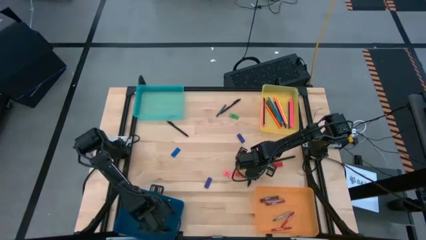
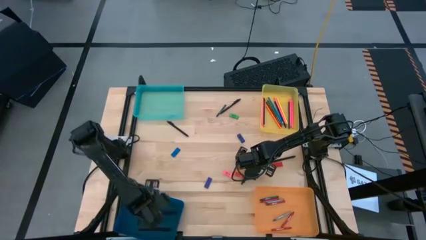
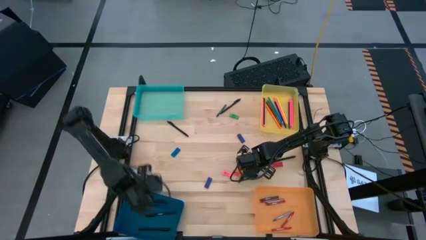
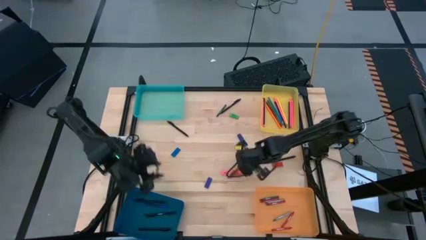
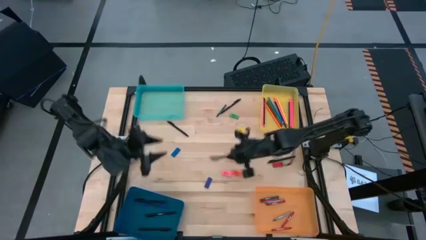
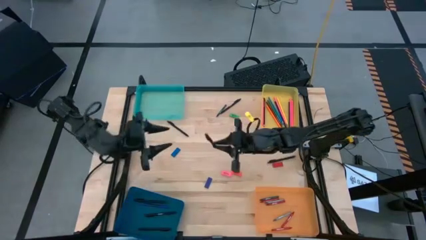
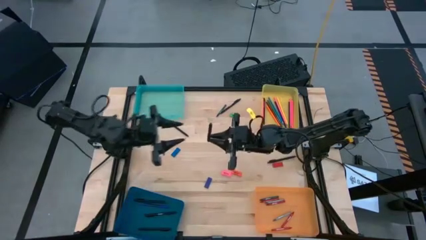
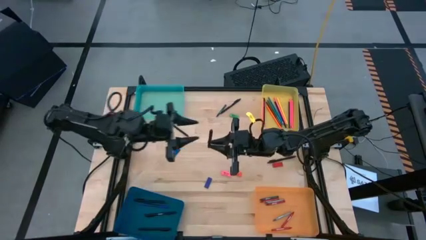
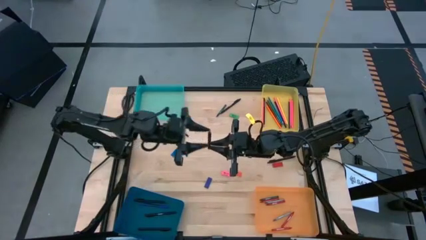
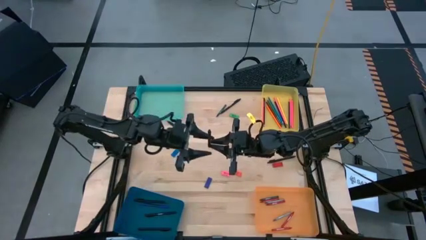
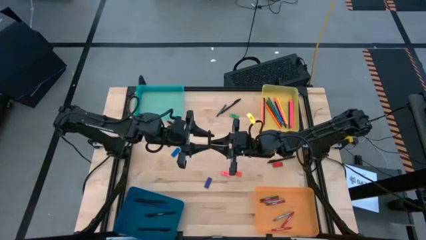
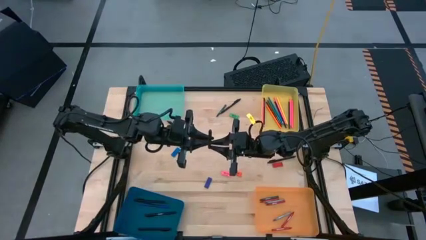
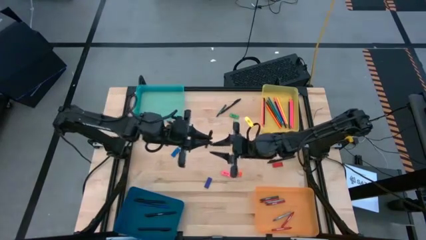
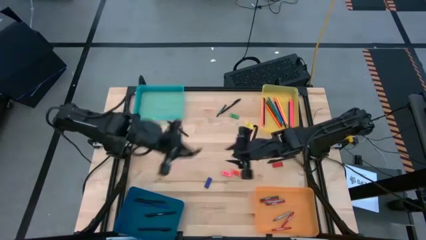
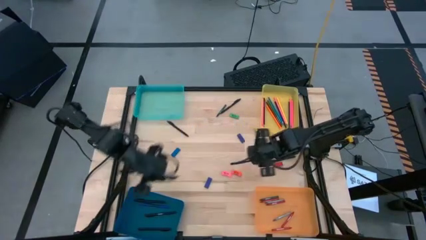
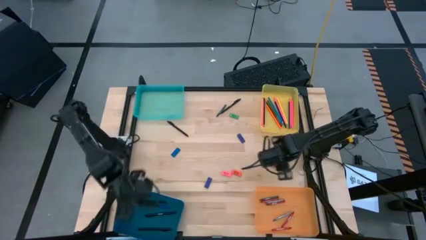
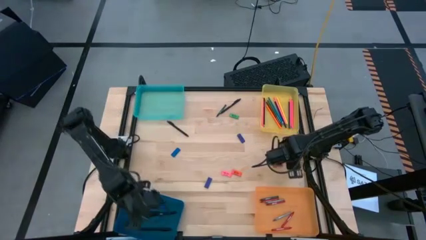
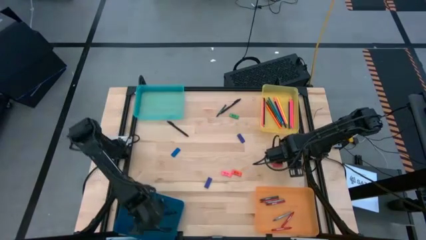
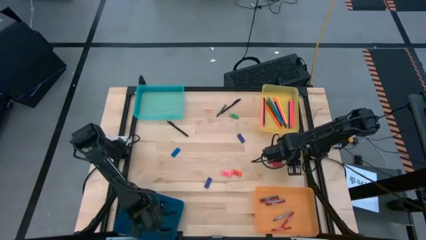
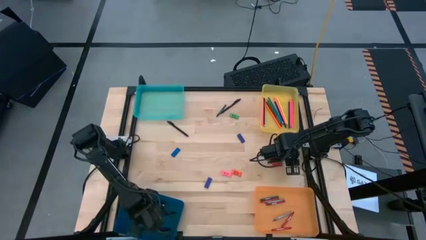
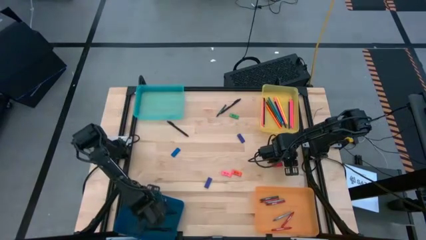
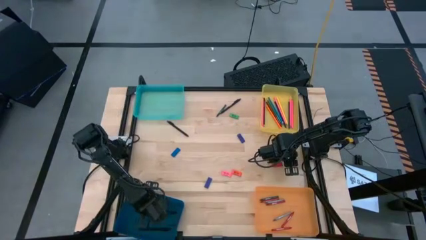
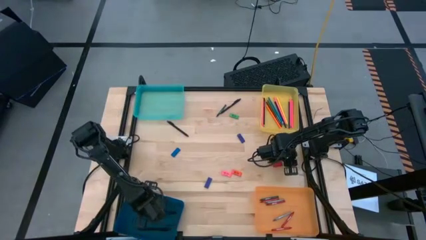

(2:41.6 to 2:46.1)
Task: Sort crayons/erasers/pens/pencils in bins
Put the black pen into the blue bin

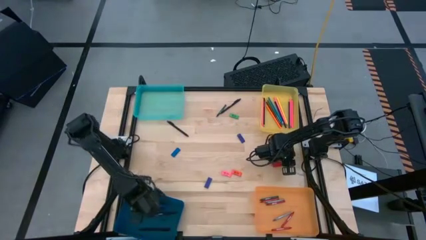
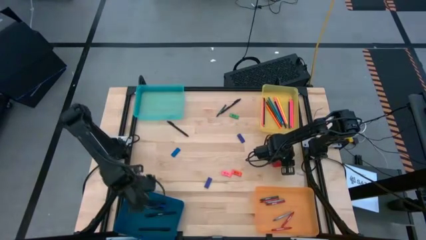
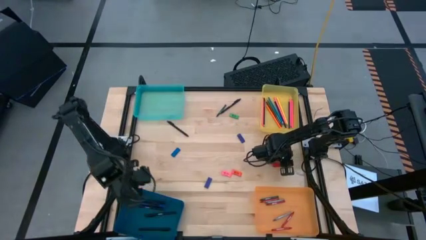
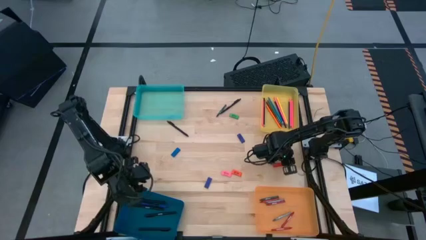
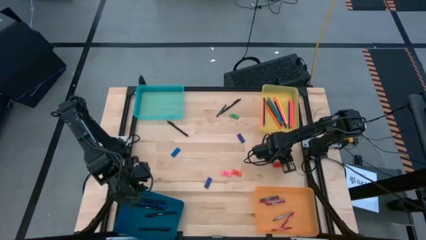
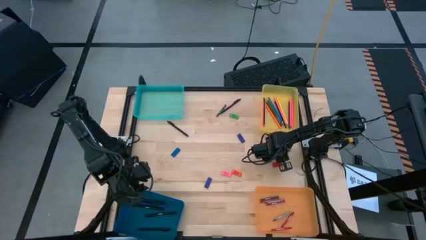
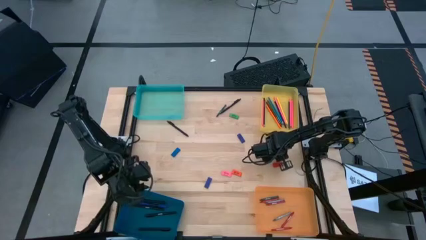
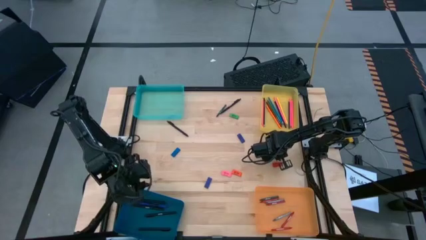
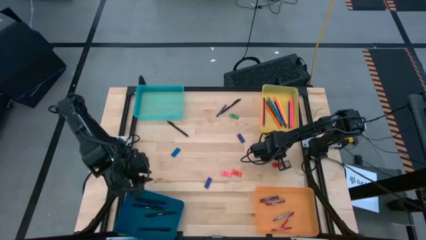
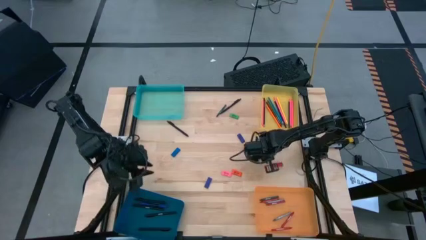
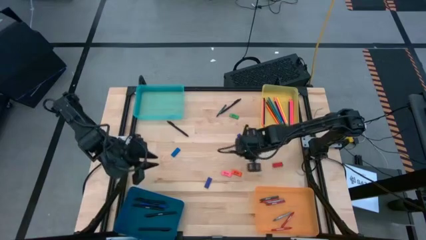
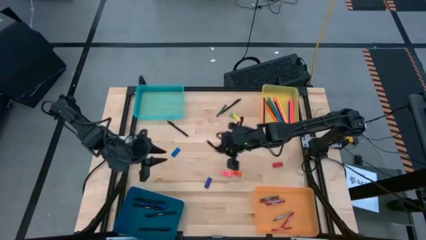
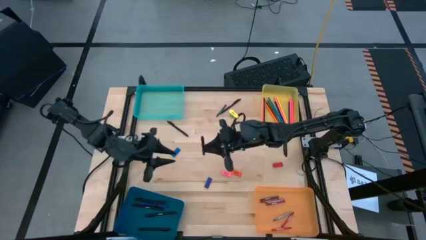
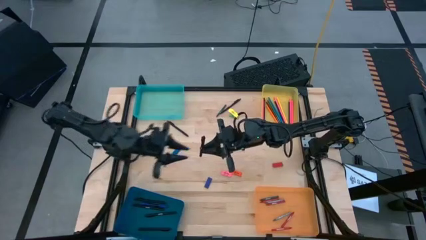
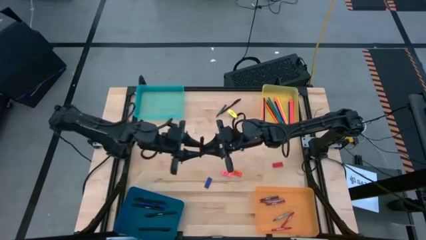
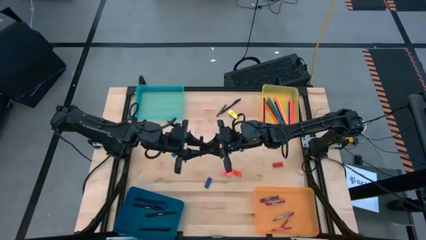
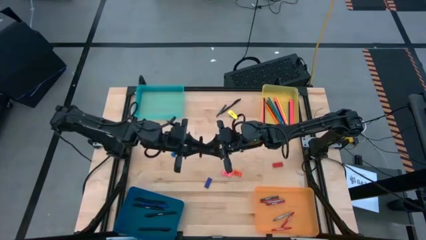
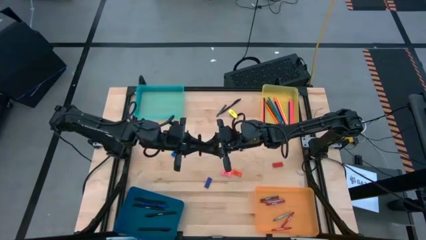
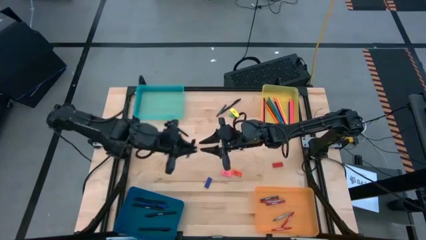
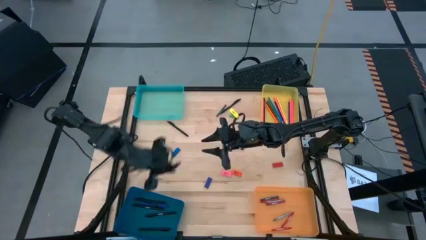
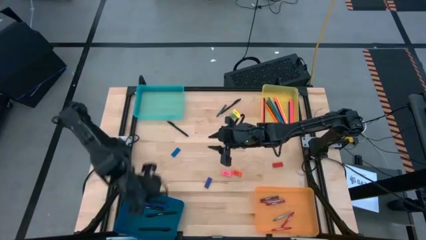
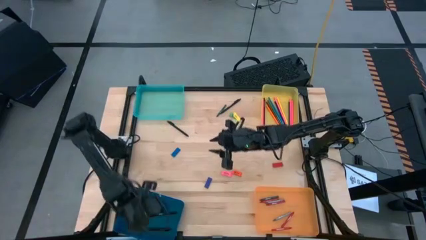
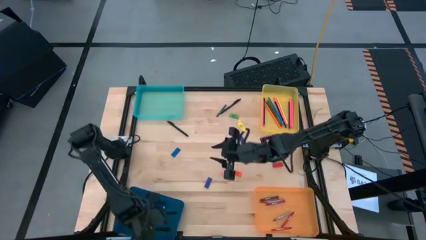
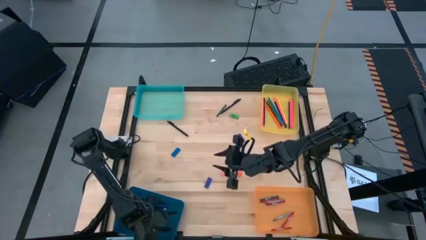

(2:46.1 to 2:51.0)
Put the black pen into the blue bin

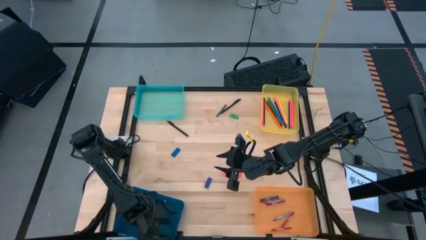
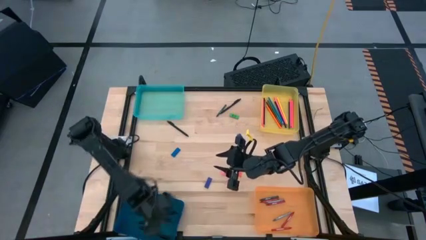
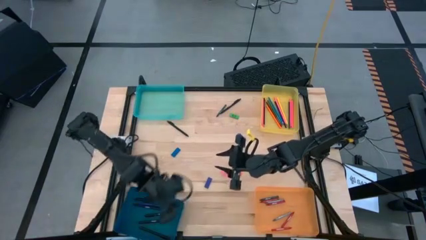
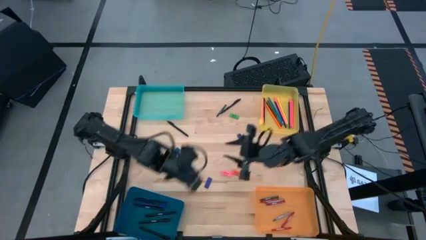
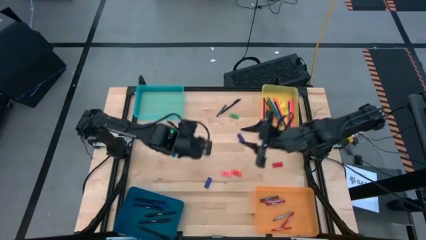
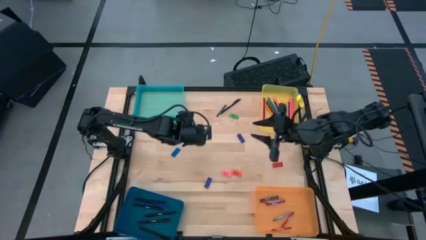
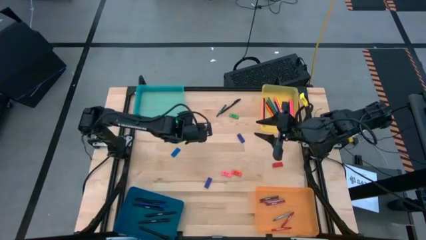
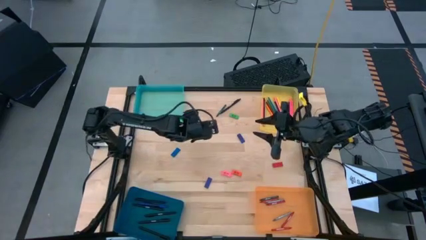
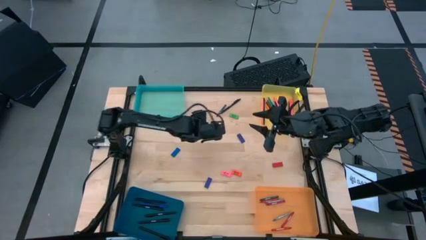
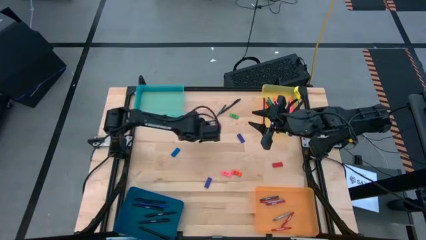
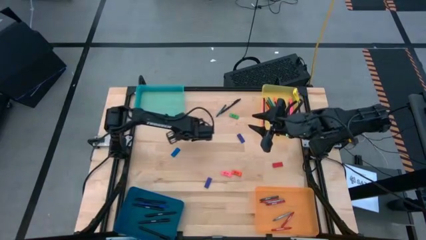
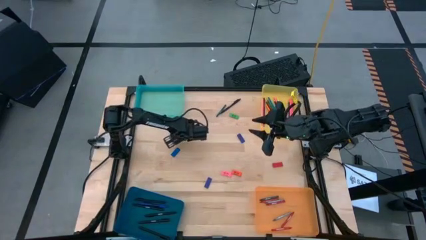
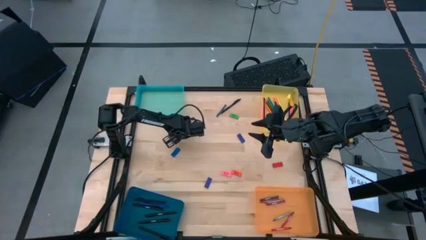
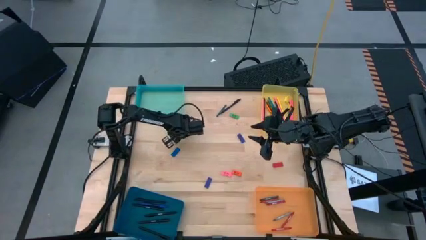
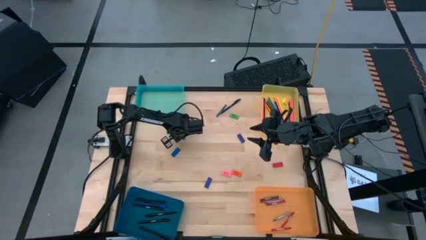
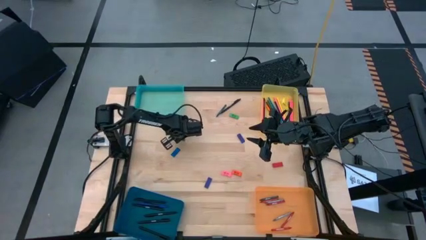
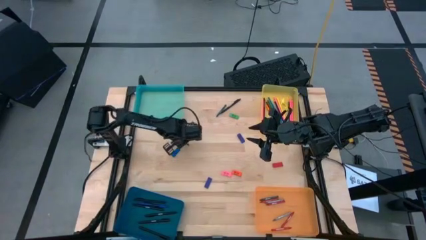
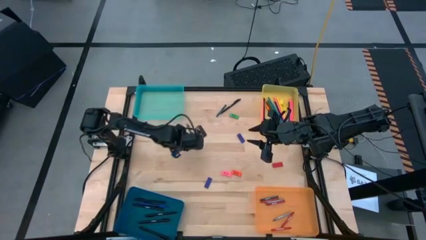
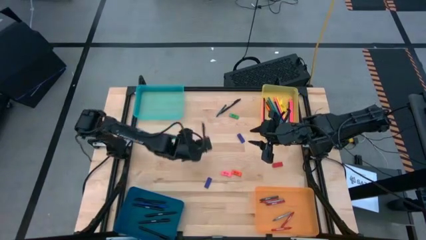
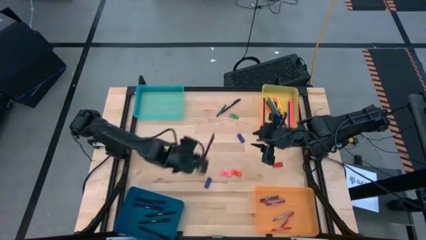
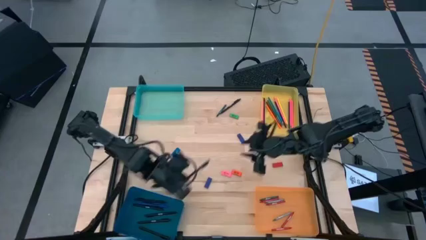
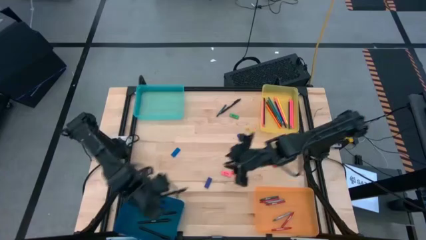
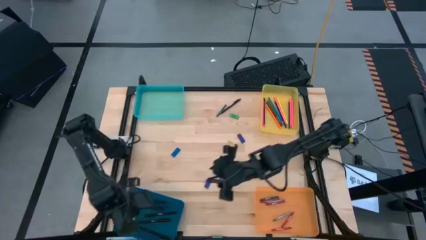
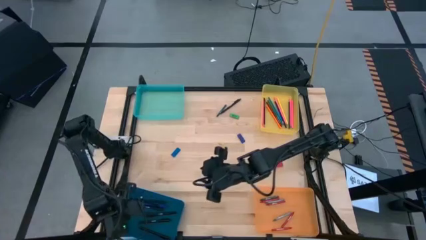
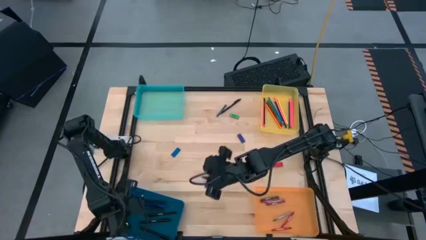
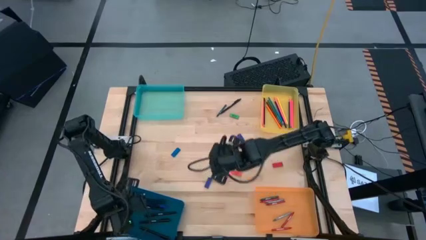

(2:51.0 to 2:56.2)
Put the black pen into the blue bin

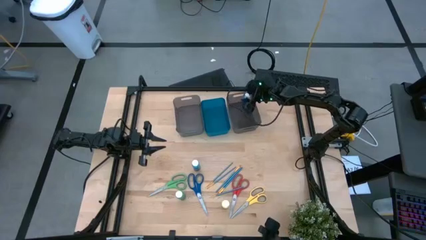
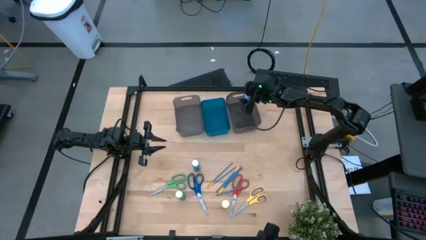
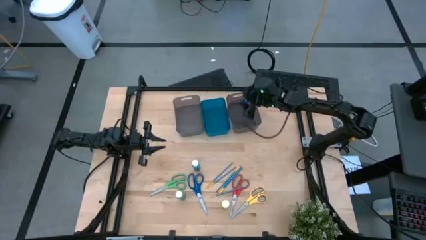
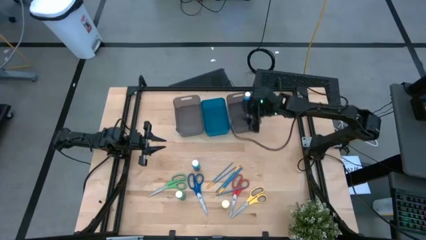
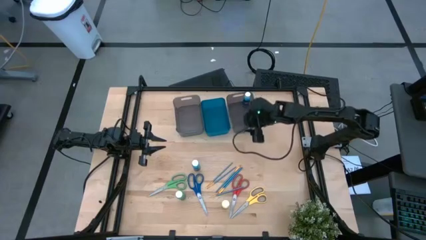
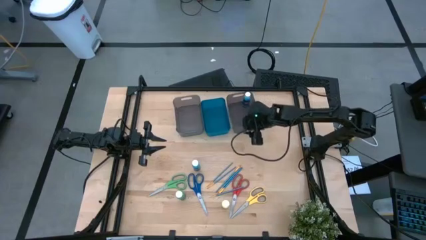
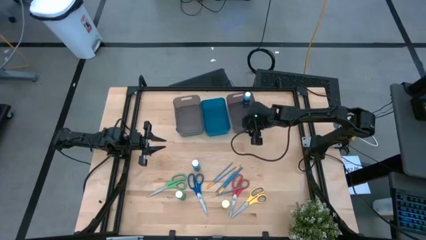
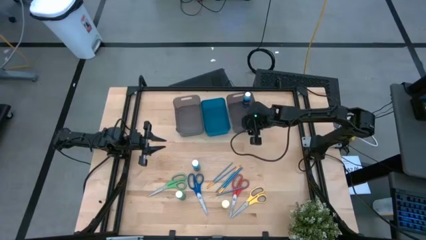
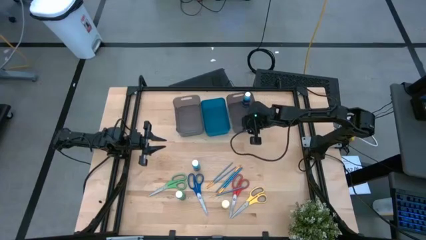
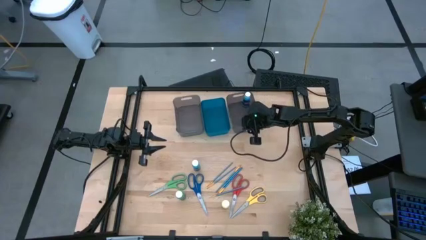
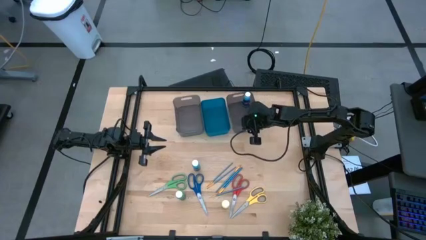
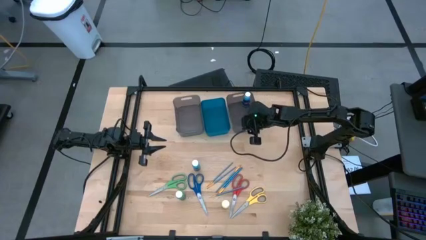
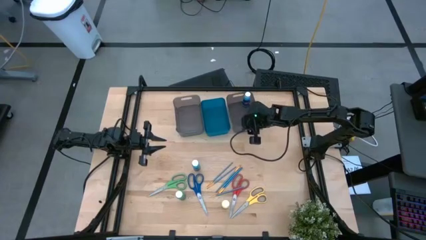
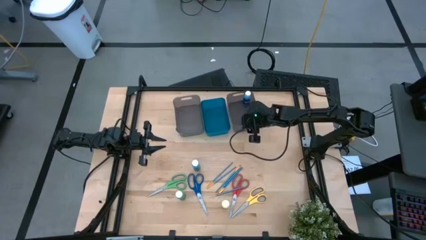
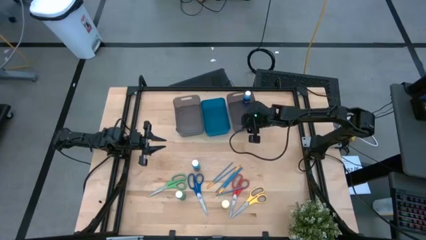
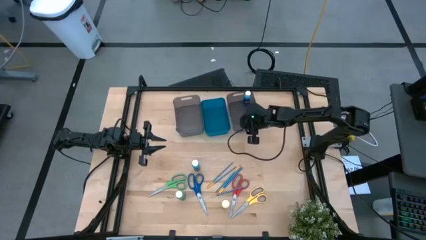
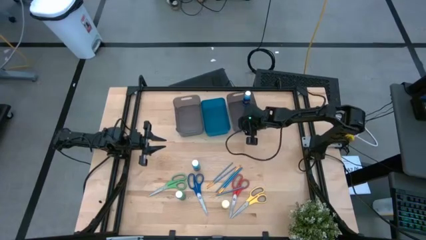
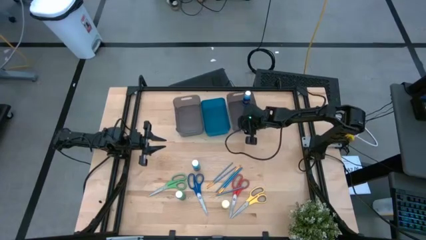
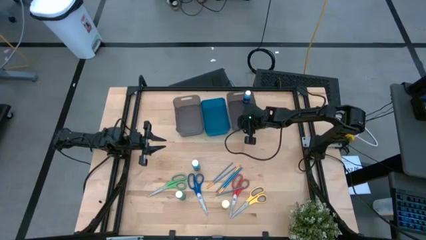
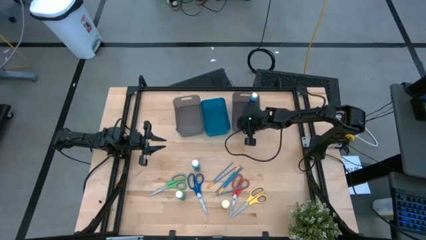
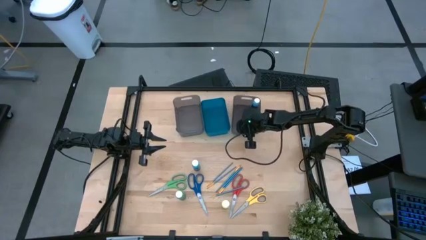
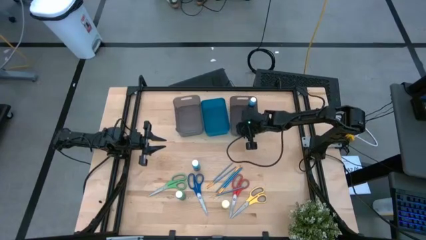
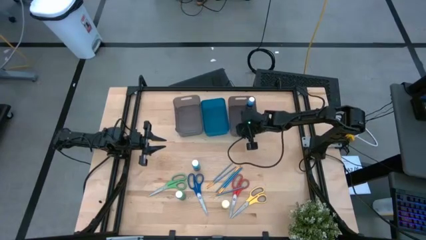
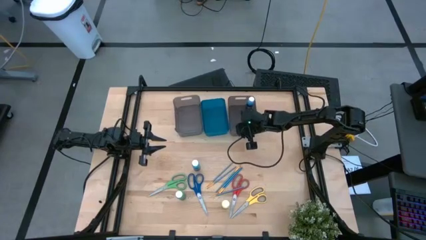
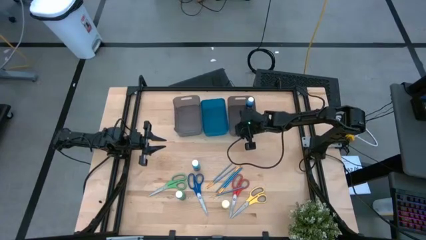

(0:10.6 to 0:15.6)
Task: Pick & Place Paint Supplies
Adjust the right gray bin on the table
